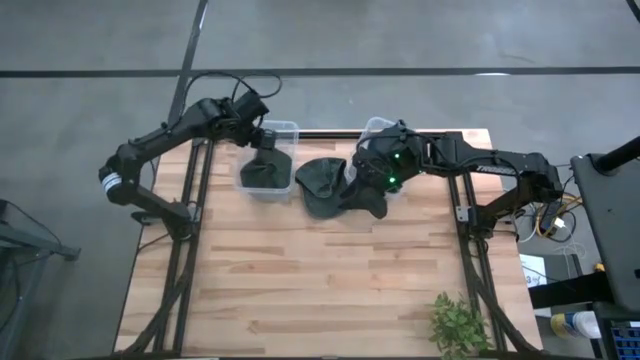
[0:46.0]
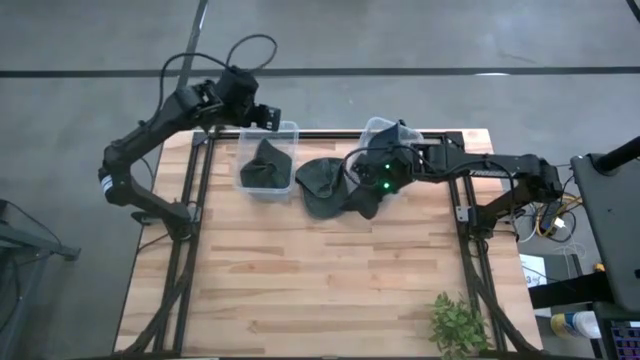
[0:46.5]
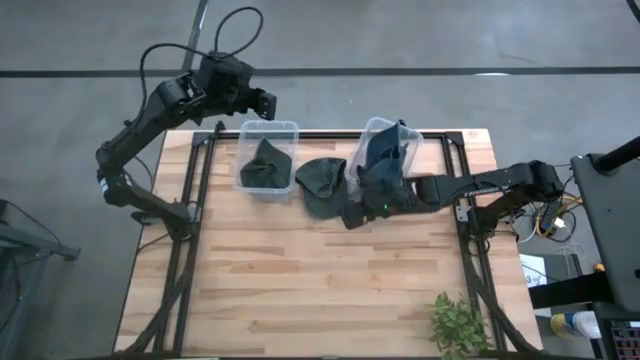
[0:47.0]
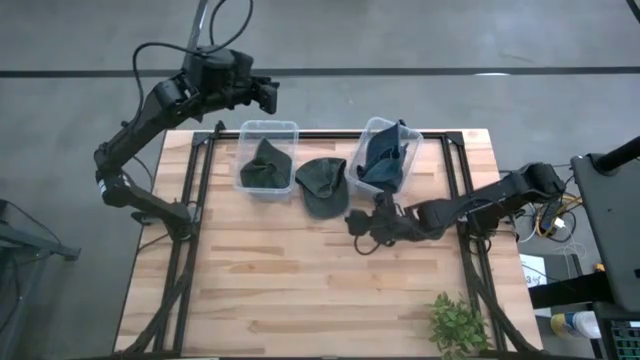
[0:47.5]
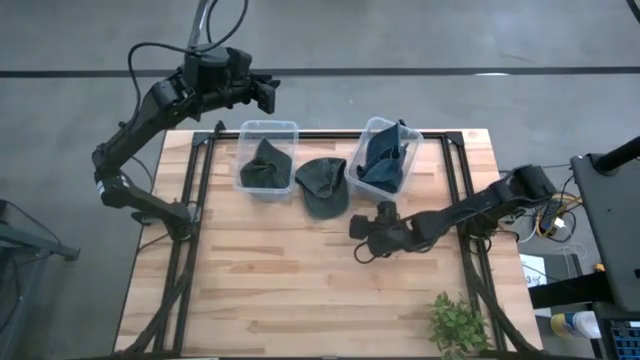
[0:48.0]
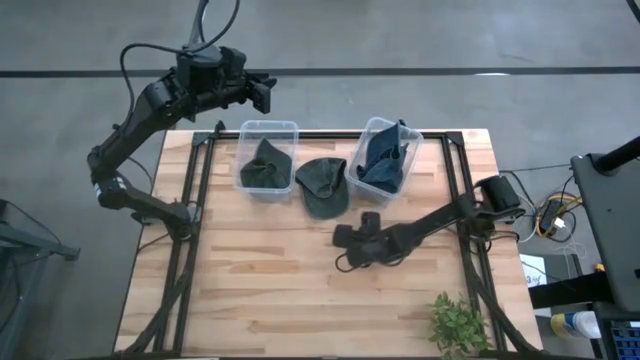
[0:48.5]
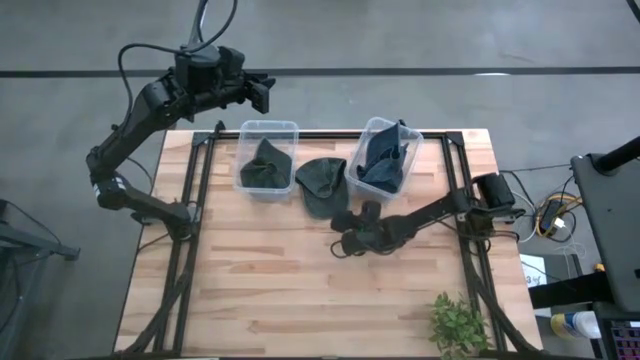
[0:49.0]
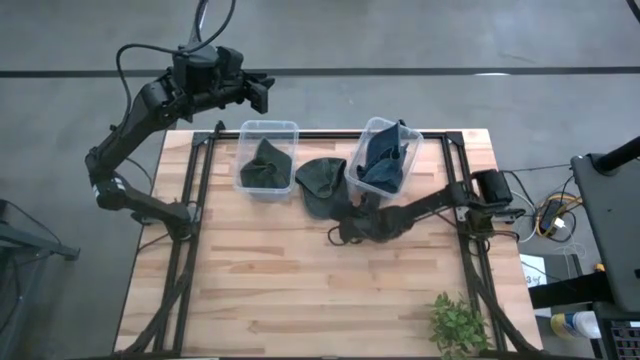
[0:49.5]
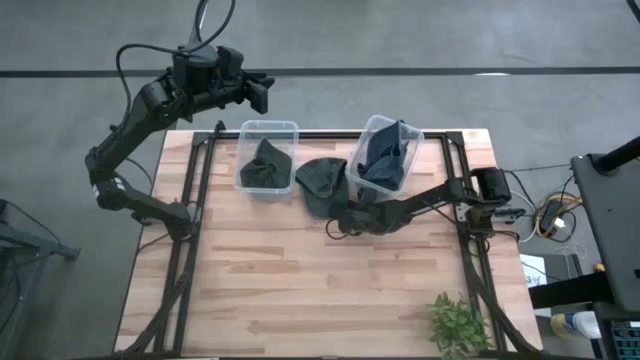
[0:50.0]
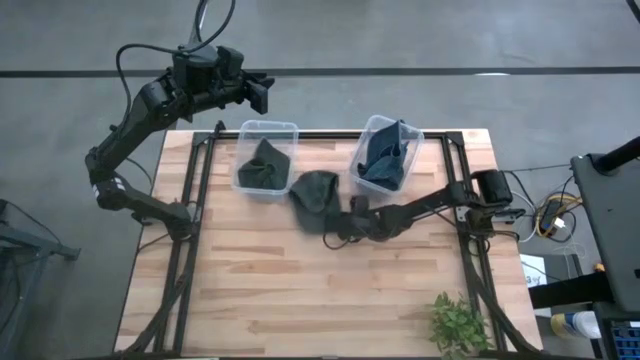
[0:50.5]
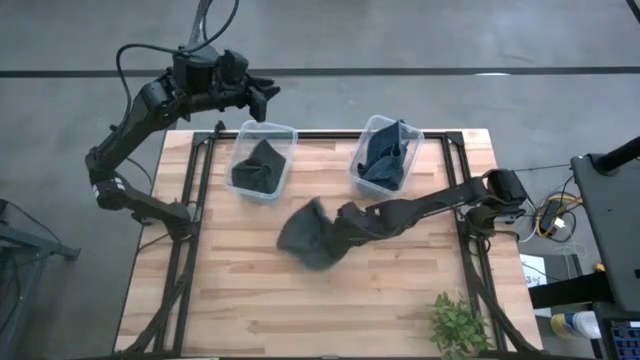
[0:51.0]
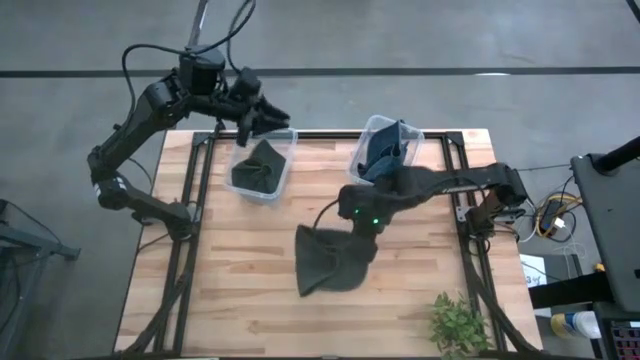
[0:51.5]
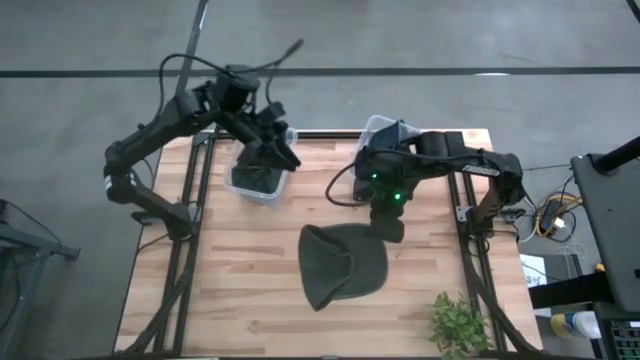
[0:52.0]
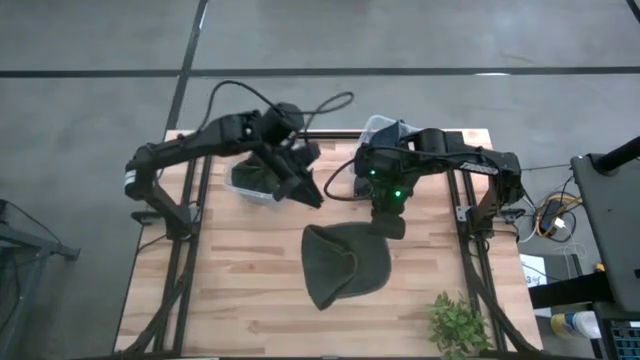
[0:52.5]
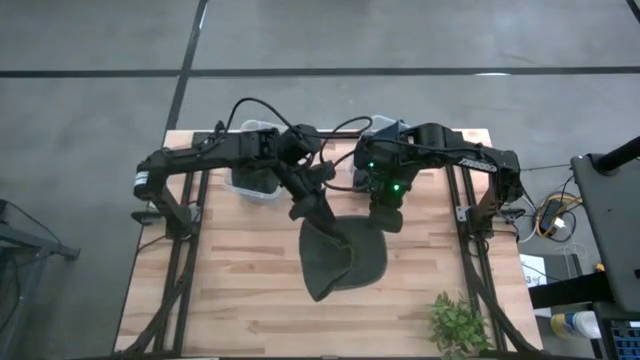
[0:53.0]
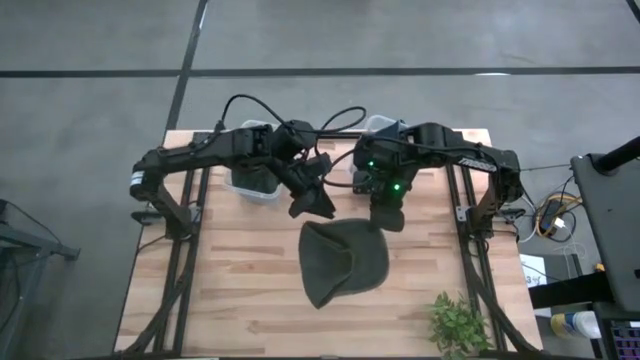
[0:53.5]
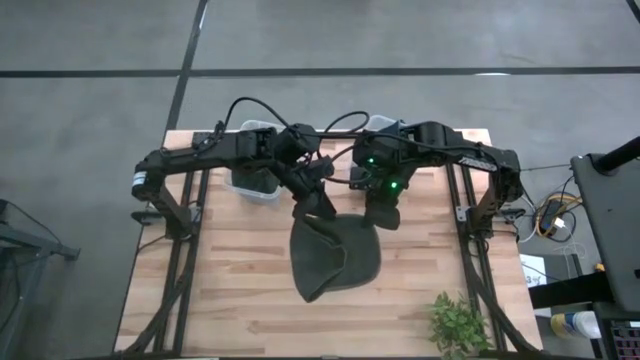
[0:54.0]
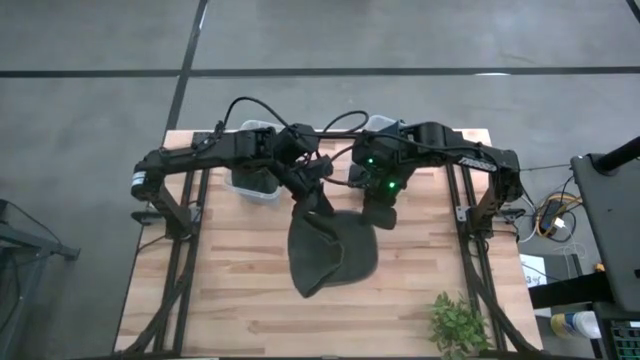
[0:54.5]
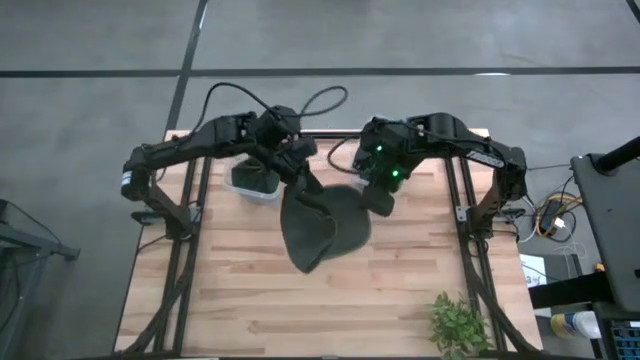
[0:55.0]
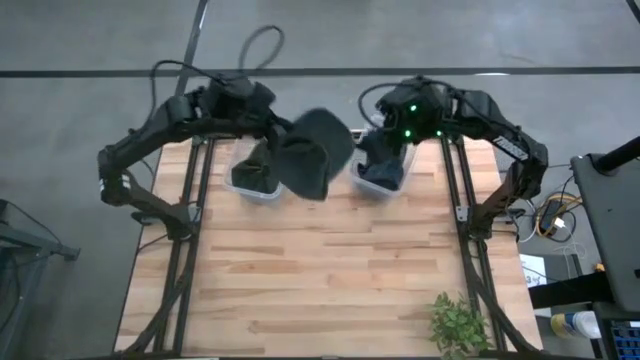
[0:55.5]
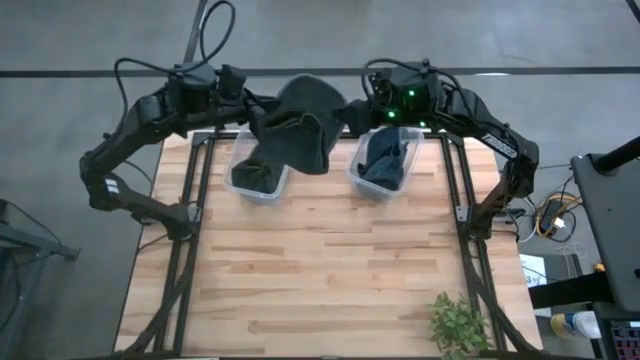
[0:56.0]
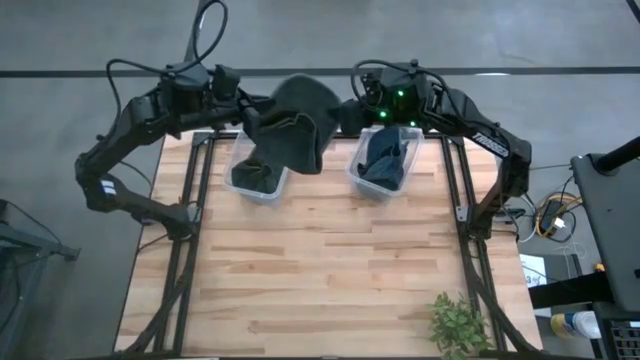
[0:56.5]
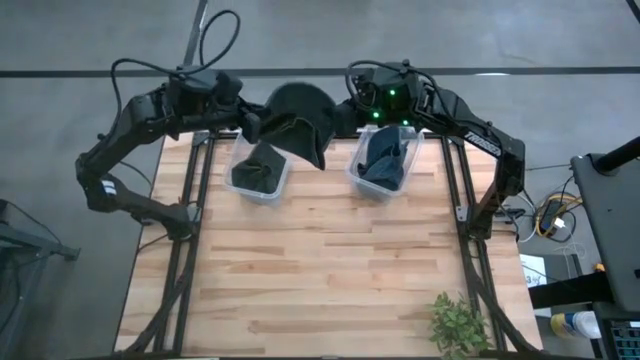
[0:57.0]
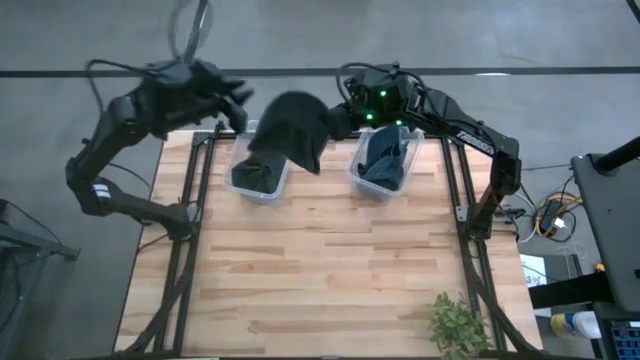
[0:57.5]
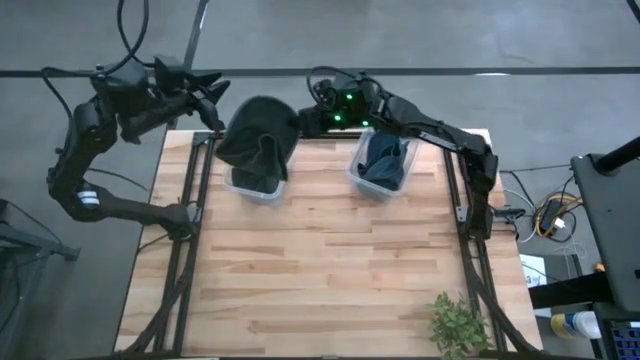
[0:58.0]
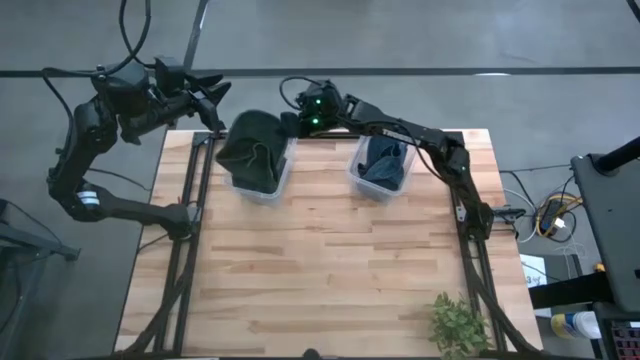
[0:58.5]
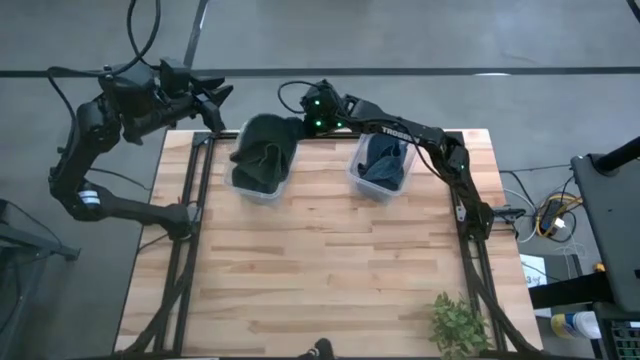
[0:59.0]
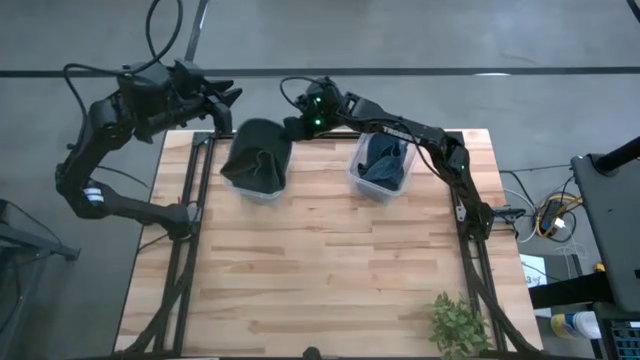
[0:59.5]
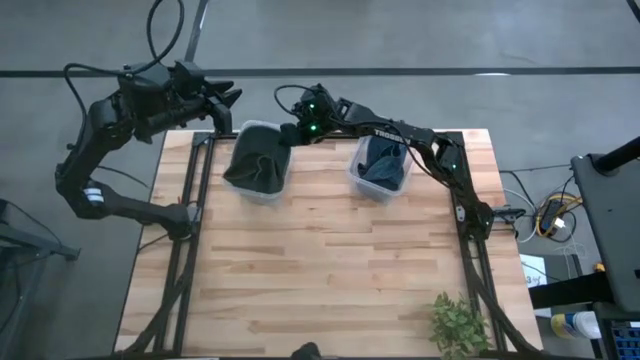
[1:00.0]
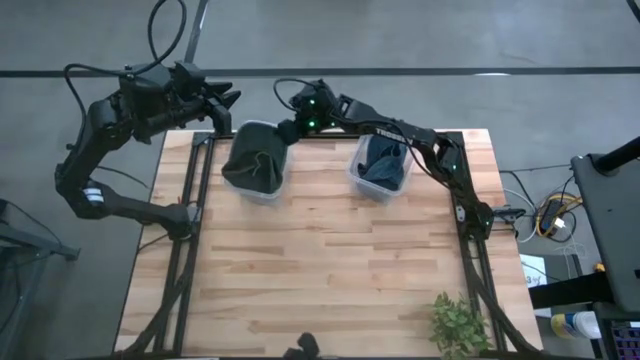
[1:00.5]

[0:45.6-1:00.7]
Task: Pick & Place hat
Put the gray cap into the left transparent bin

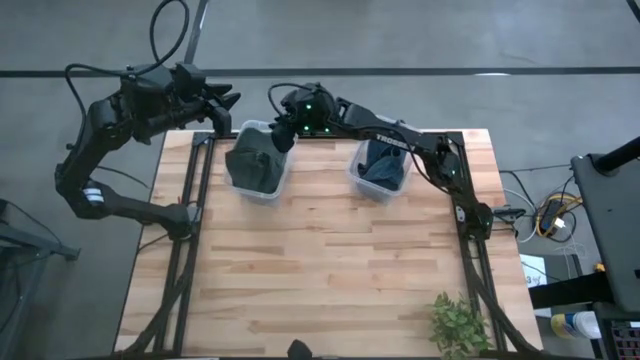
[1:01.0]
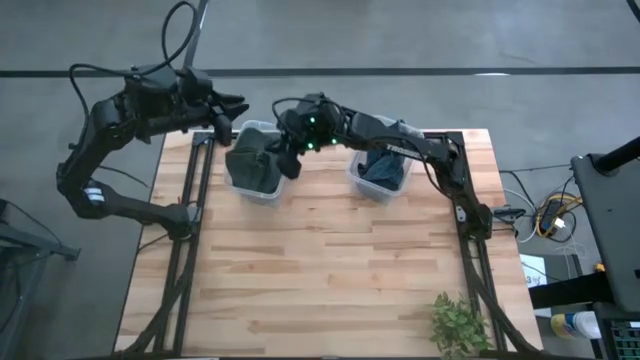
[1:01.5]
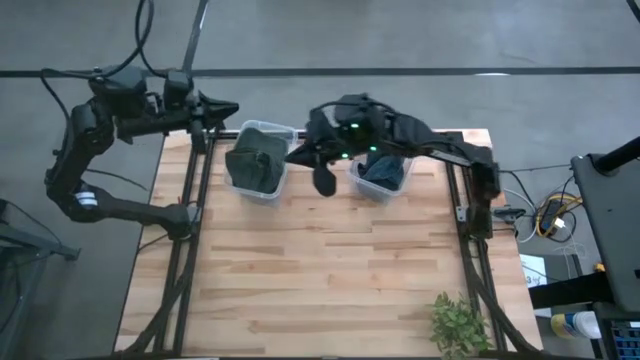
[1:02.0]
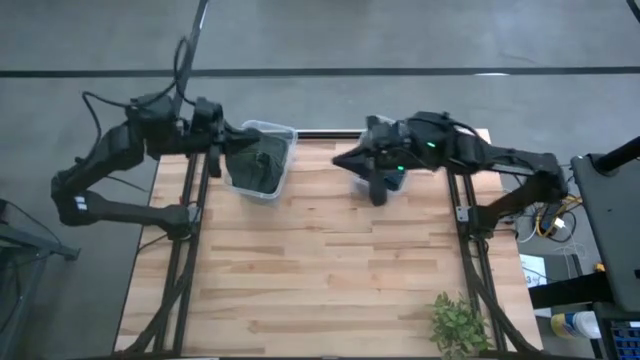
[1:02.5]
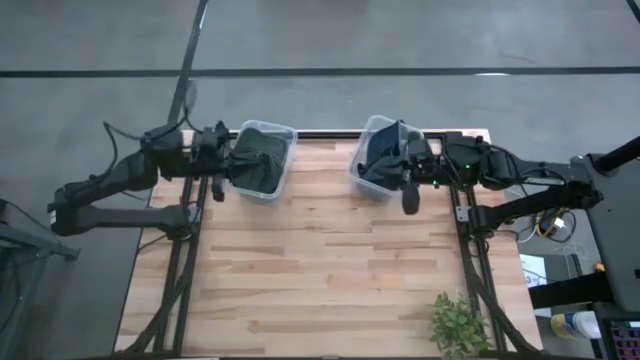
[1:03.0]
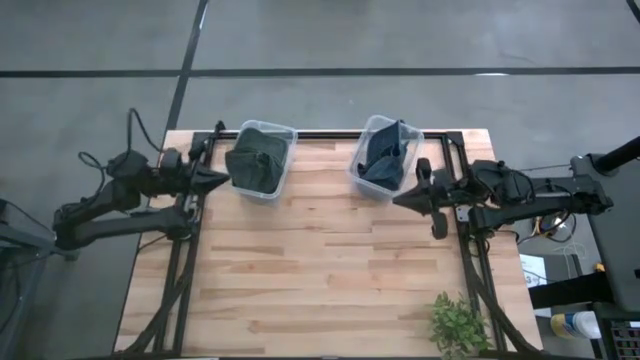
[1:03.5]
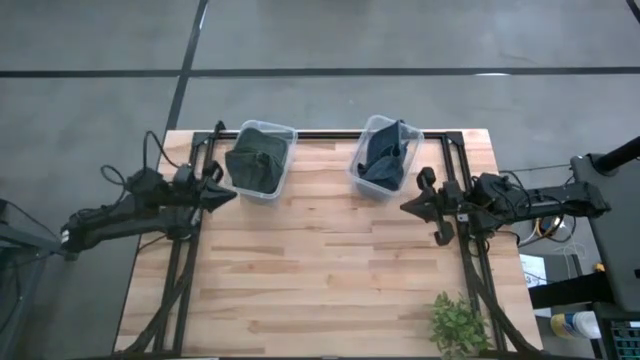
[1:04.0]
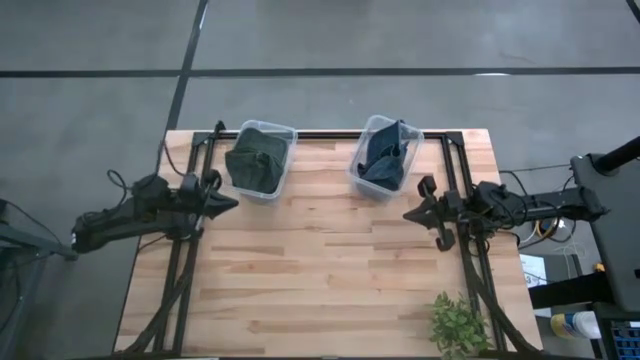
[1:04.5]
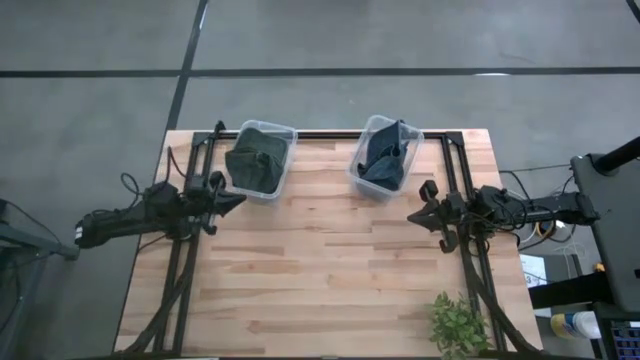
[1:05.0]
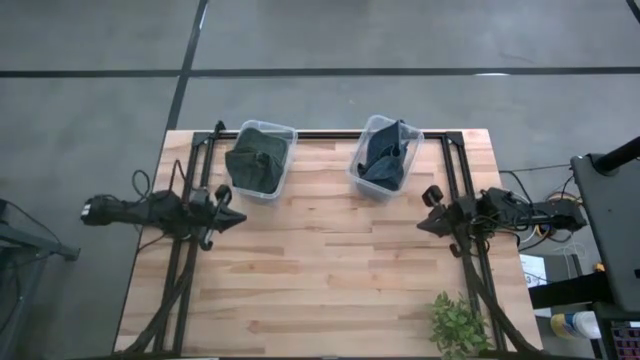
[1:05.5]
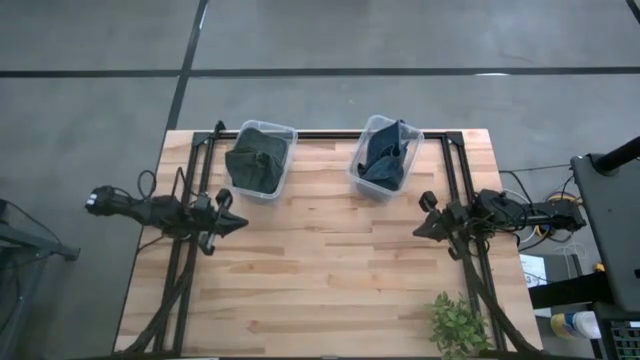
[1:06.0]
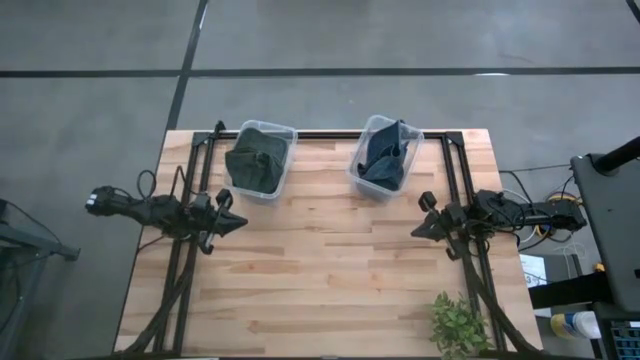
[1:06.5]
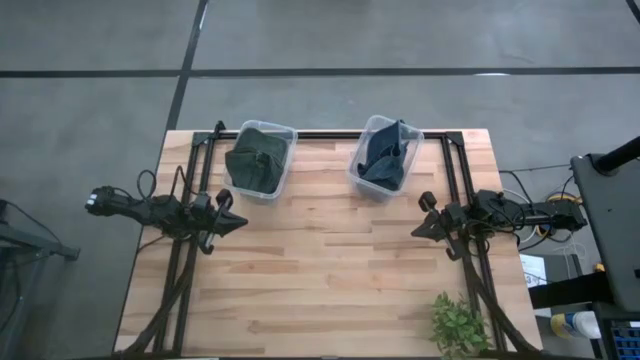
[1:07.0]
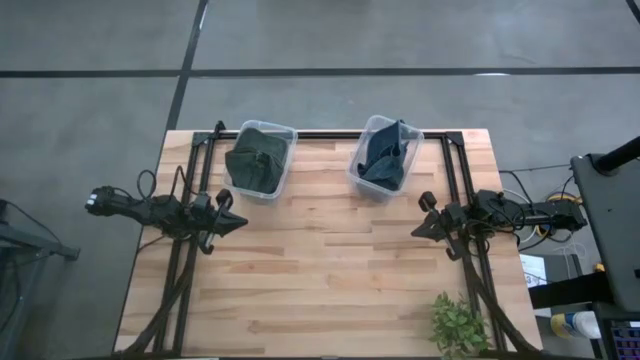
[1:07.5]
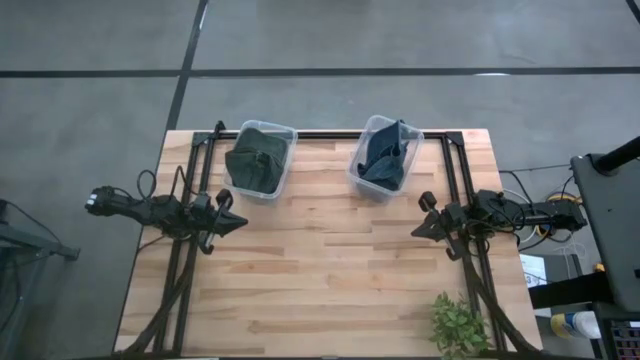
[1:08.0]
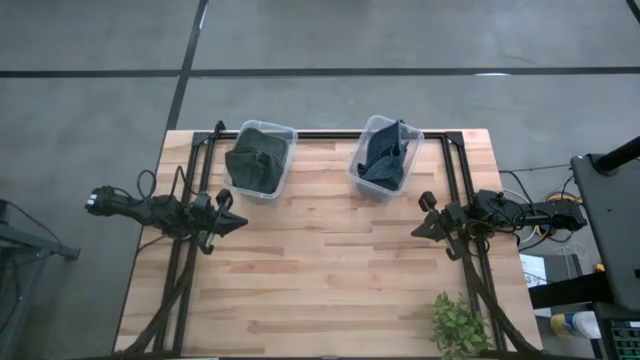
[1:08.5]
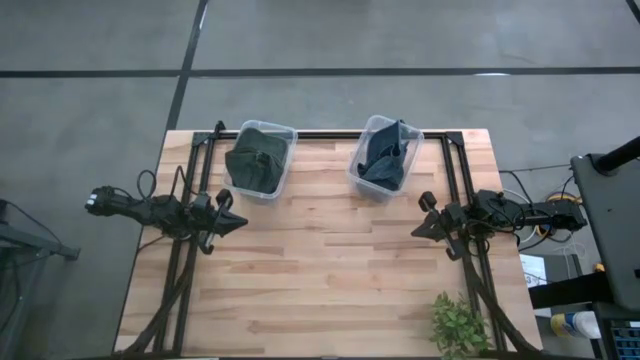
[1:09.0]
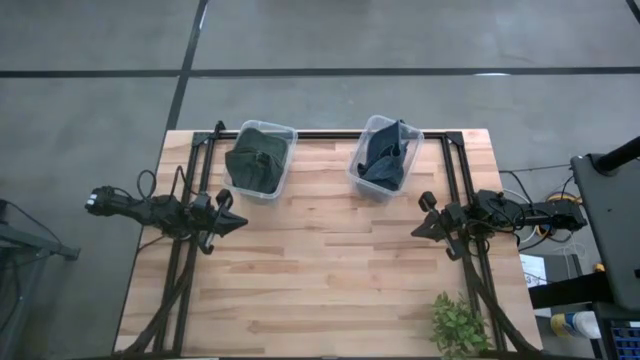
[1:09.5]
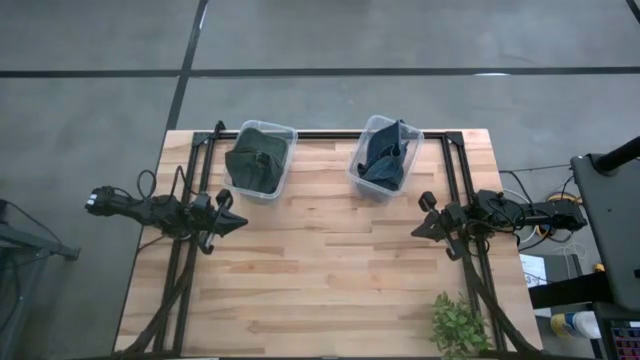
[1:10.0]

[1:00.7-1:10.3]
Return to Home Position
